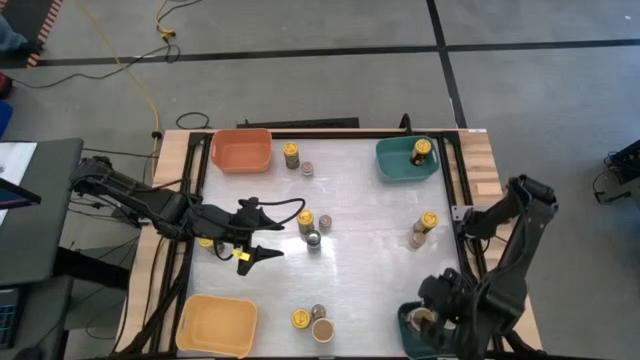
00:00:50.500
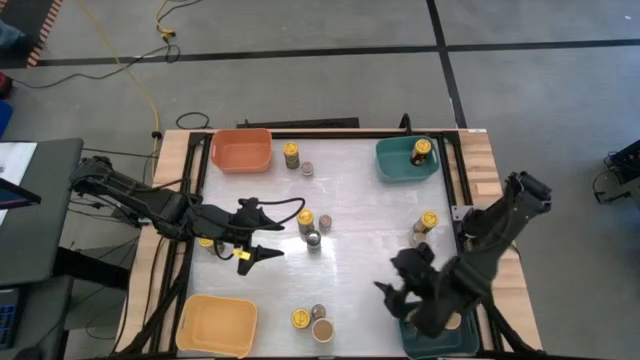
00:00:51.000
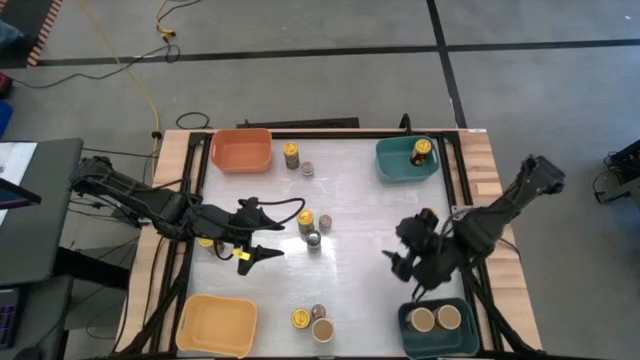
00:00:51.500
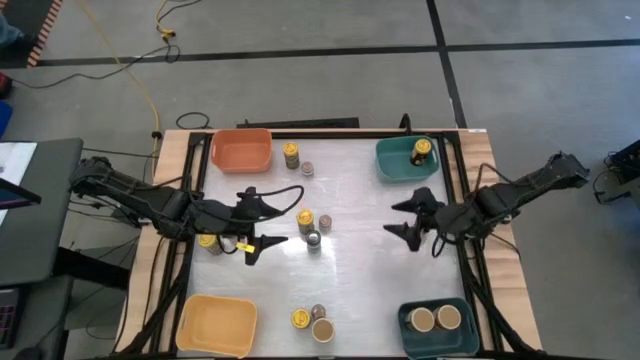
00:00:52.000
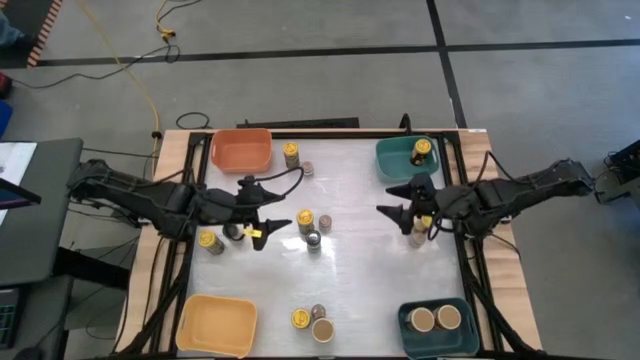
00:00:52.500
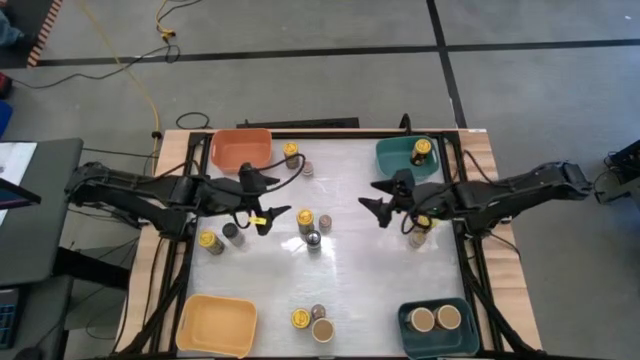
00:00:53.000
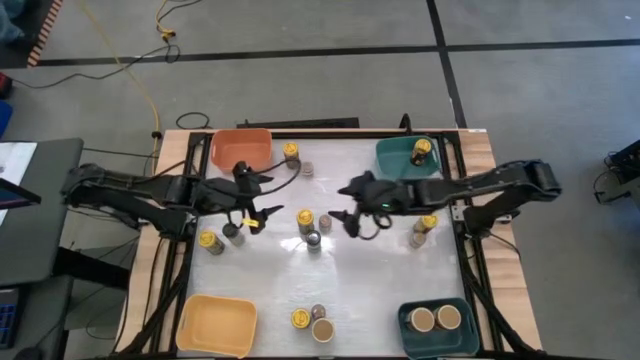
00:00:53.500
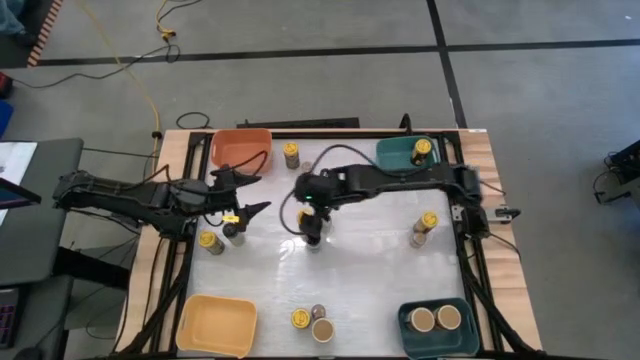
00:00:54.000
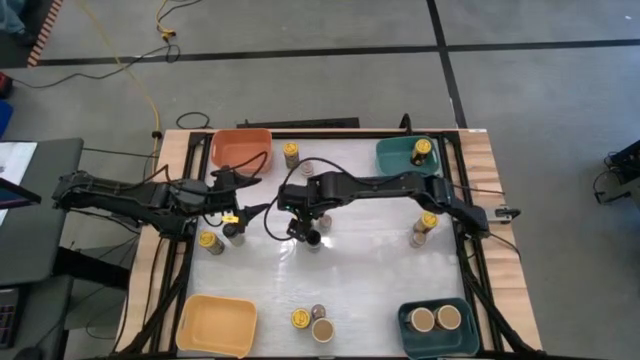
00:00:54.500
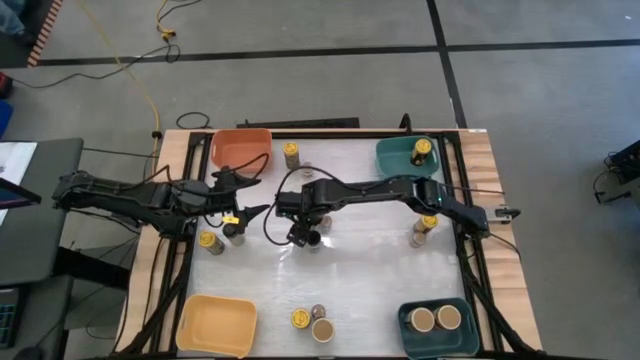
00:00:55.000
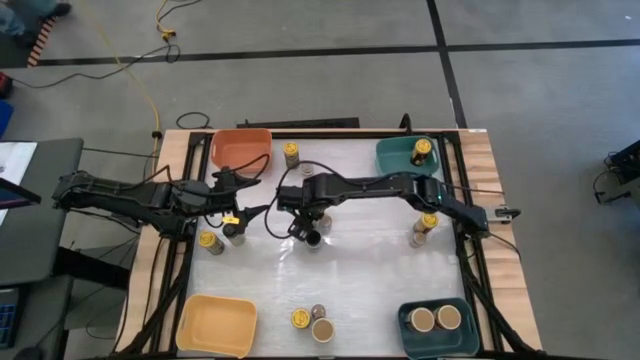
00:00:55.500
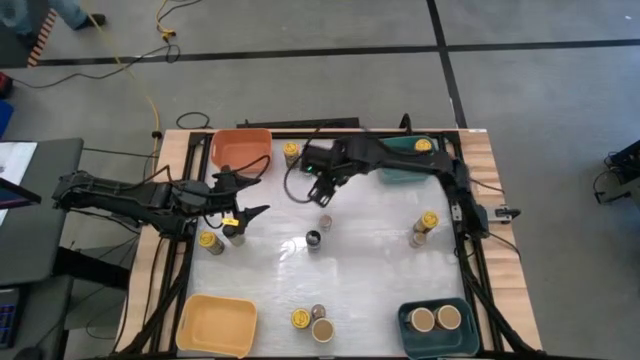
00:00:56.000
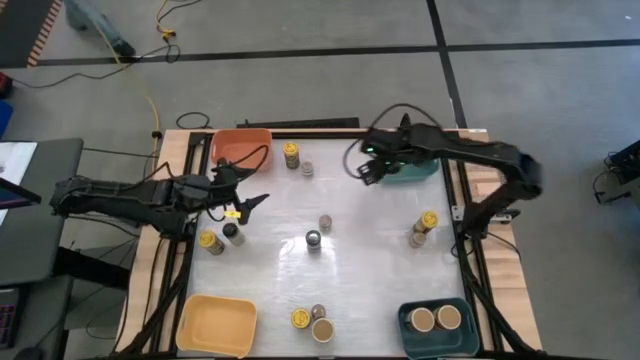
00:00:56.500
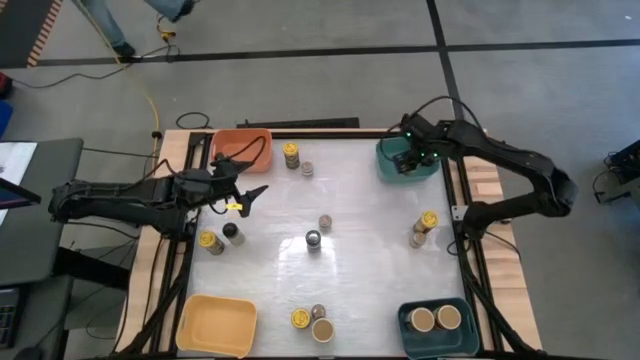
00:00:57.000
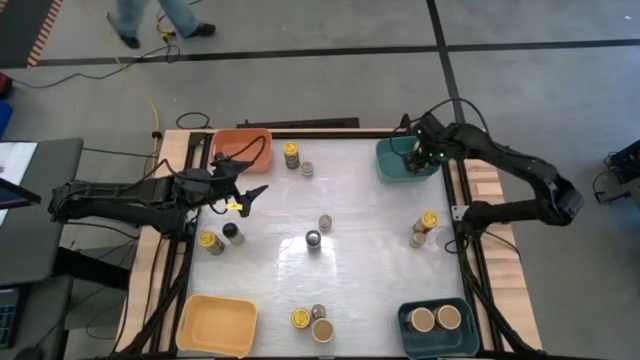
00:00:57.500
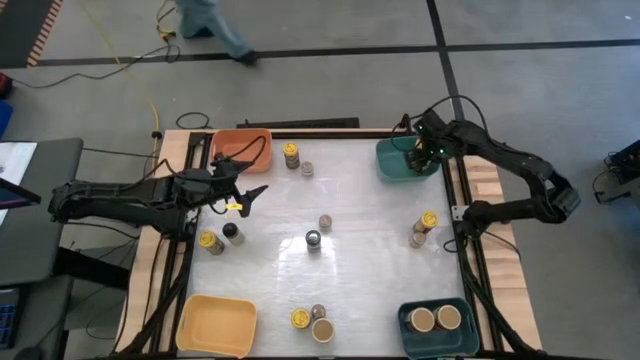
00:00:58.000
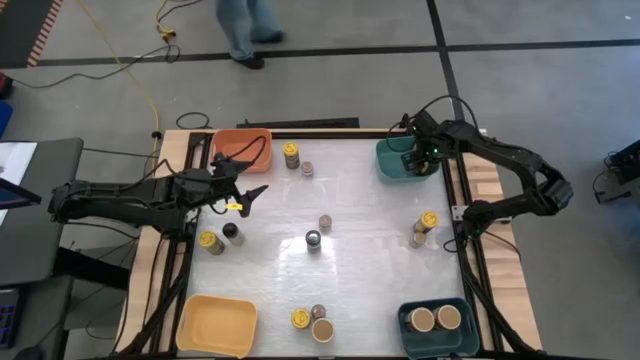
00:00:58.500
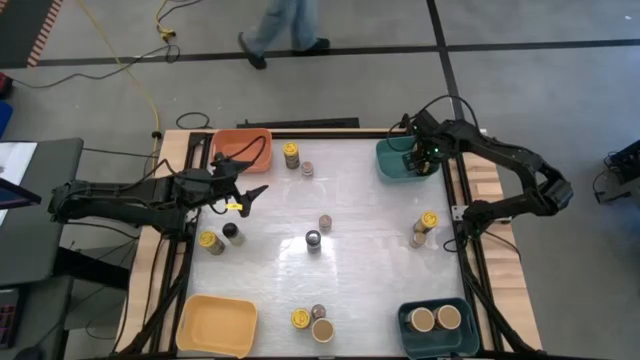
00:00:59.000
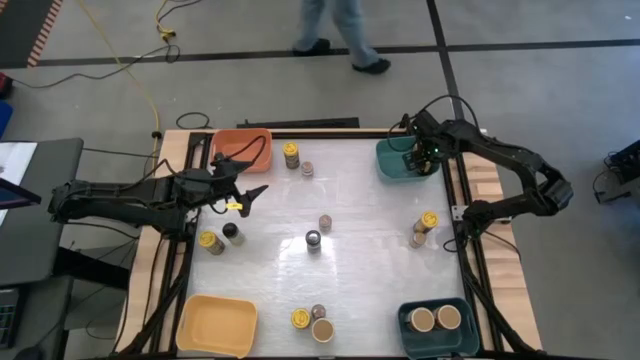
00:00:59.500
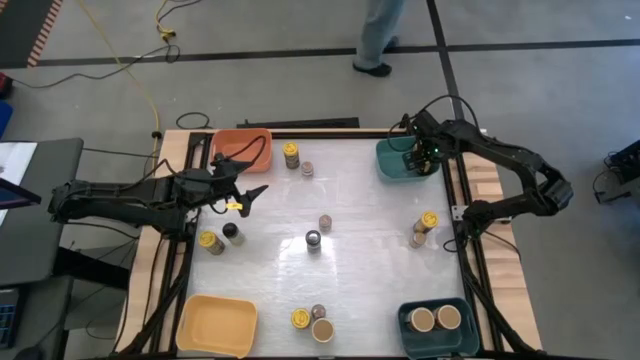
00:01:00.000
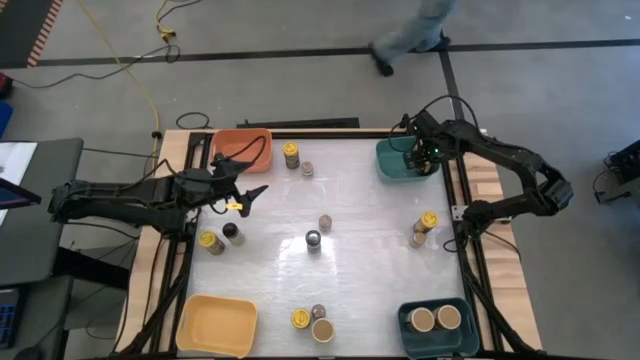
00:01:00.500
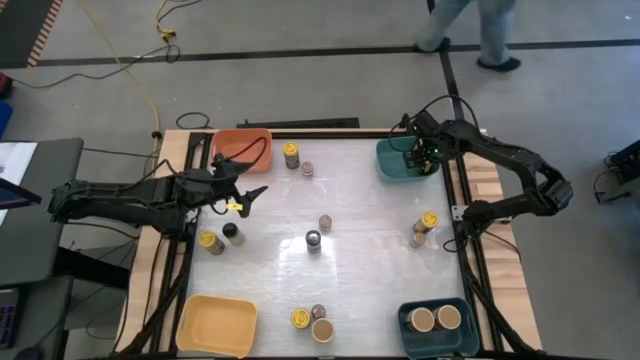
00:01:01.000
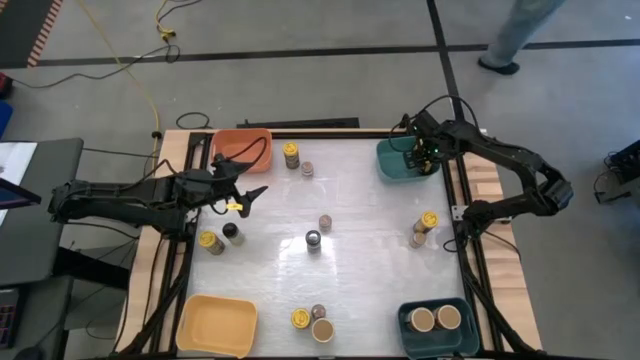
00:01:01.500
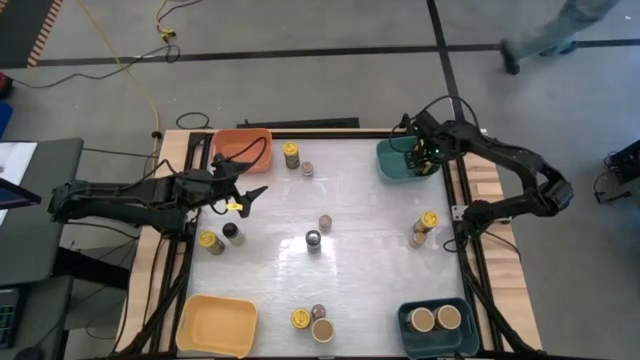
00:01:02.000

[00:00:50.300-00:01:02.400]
Task: Sort spices by type
Put the center yellow seasoning into the light blue bin

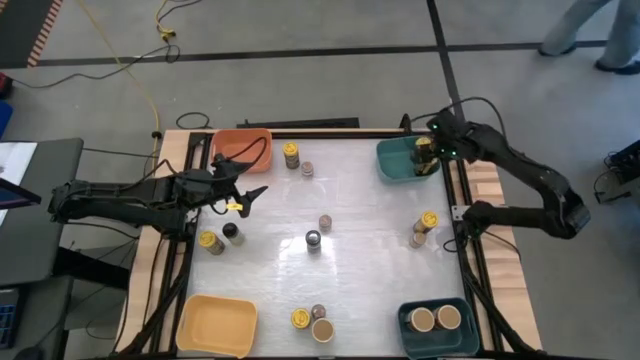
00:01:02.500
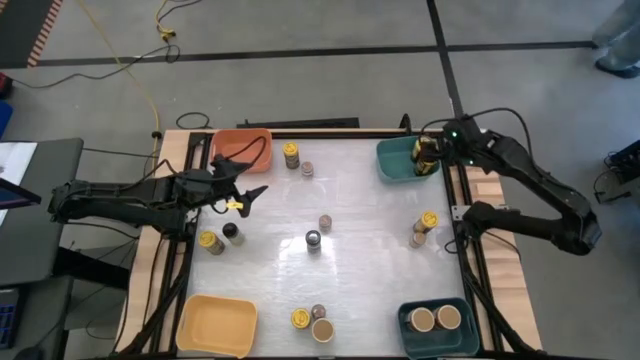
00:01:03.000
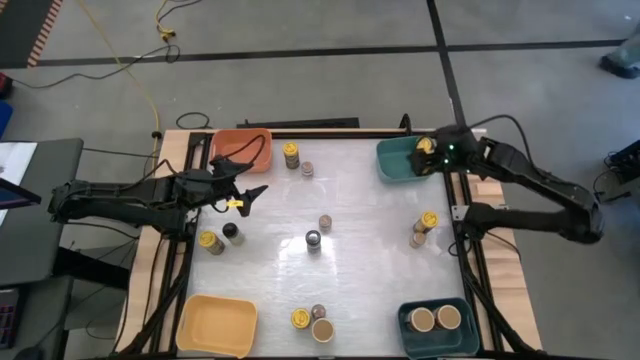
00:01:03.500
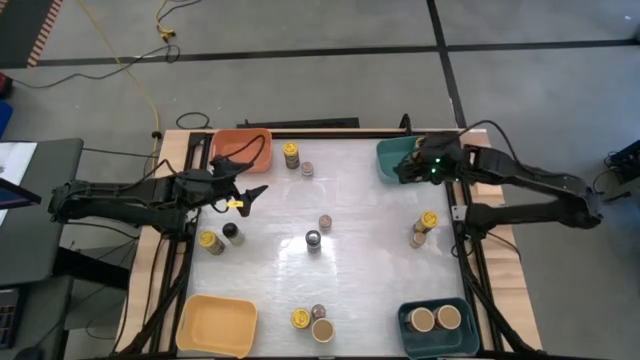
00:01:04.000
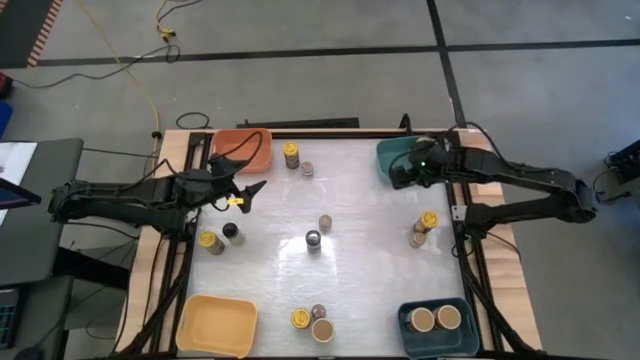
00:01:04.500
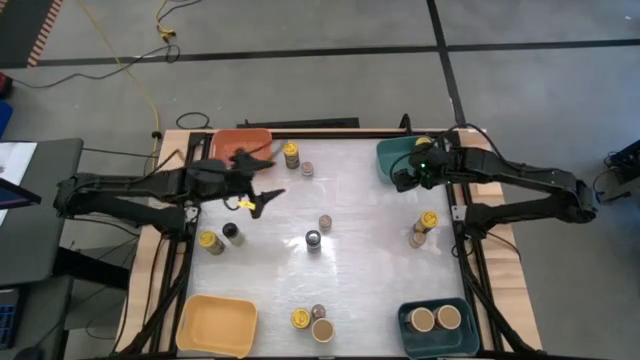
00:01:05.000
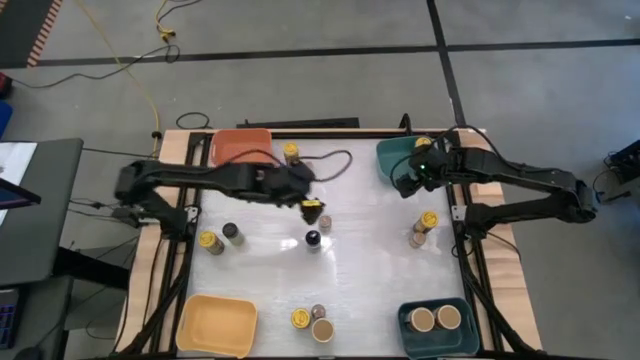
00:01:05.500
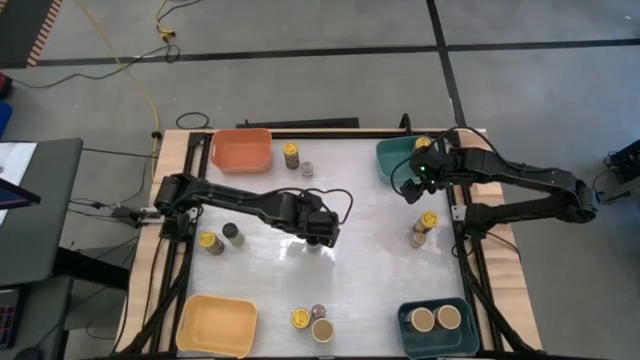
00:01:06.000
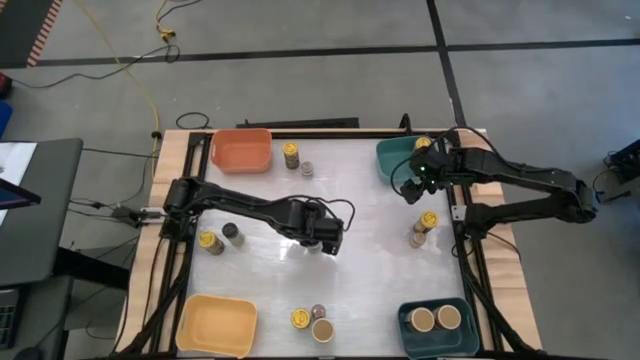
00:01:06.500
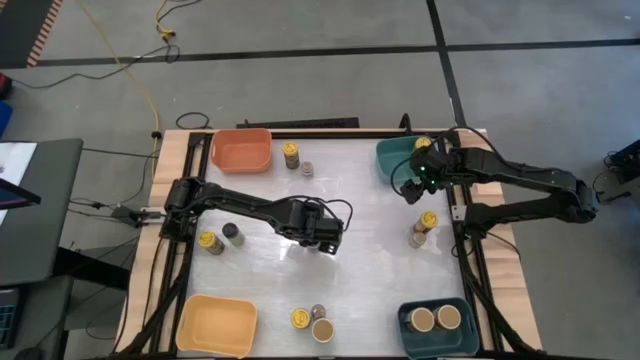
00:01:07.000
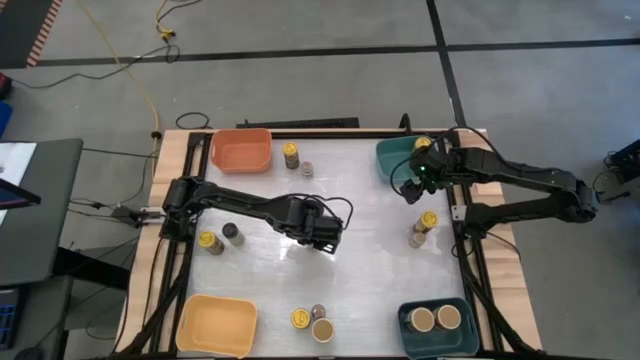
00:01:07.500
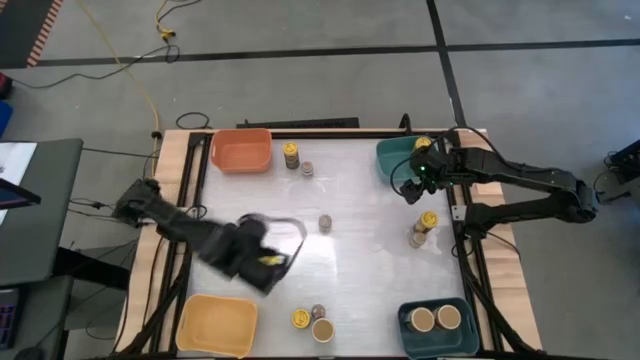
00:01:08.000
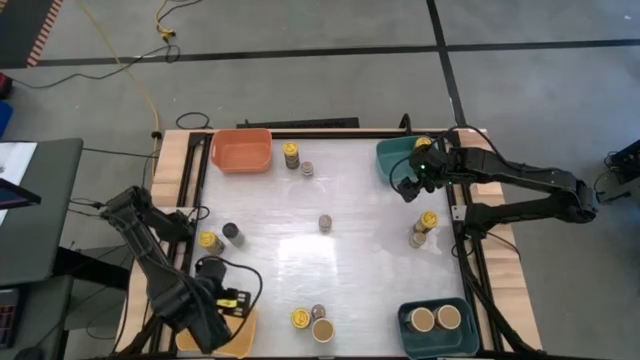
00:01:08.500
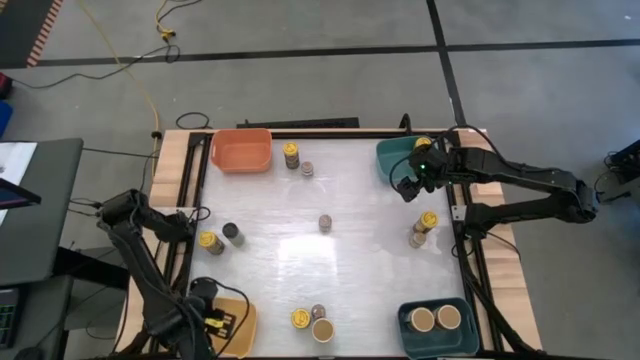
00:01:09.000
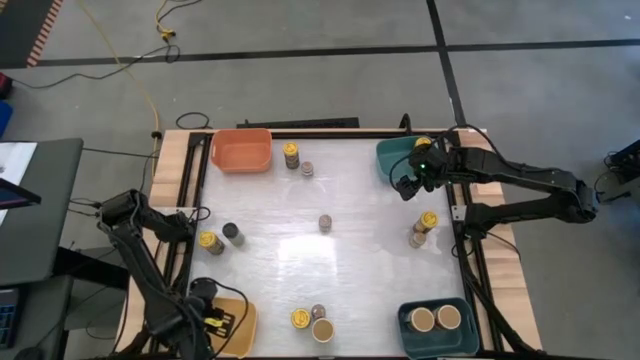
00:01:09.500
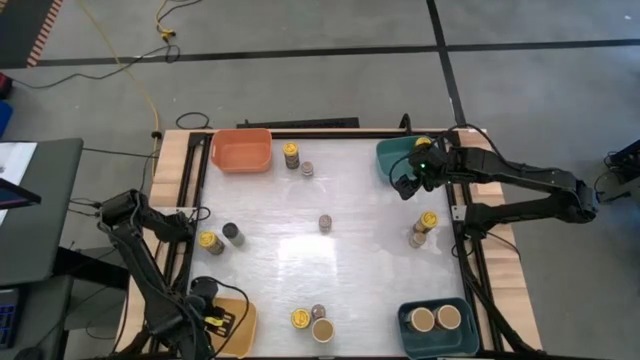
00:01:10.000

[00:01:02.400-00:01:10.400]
Put the right black seasoning bottle into the yellow bin
